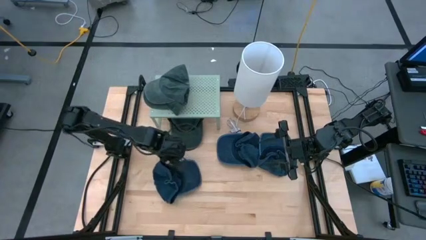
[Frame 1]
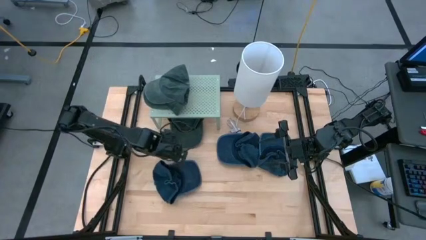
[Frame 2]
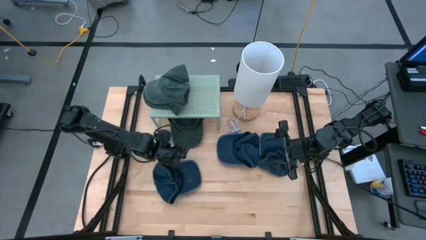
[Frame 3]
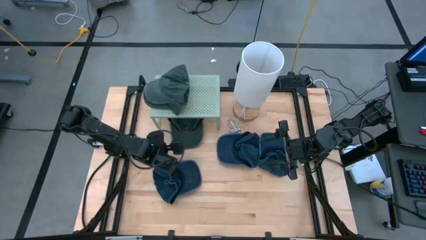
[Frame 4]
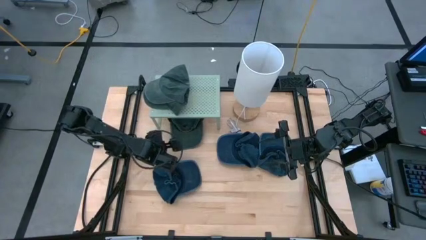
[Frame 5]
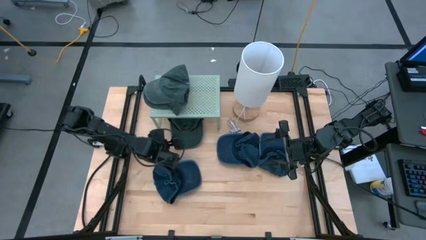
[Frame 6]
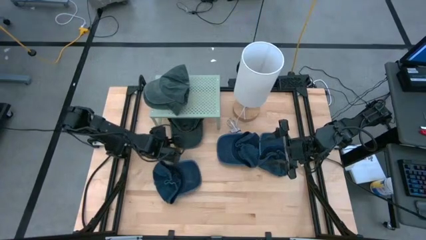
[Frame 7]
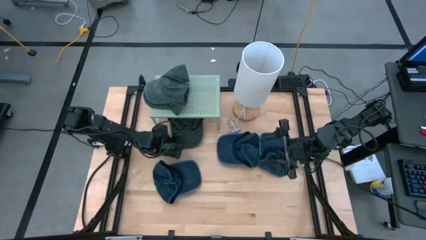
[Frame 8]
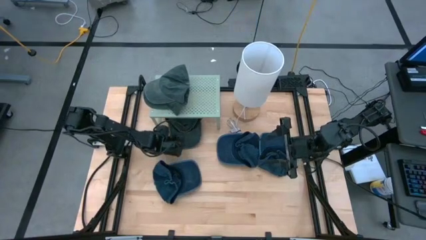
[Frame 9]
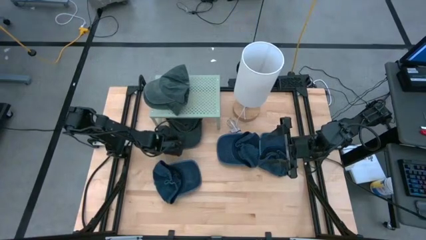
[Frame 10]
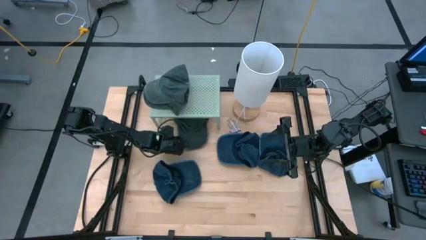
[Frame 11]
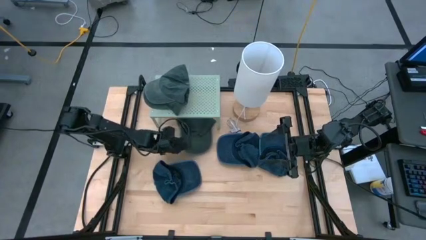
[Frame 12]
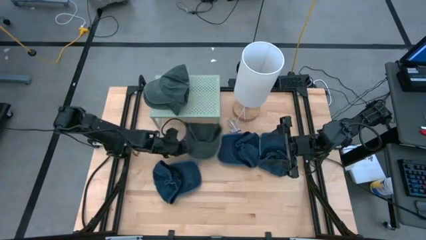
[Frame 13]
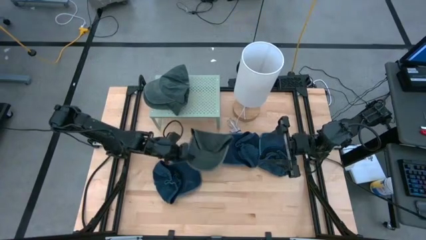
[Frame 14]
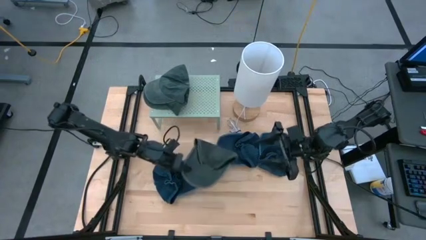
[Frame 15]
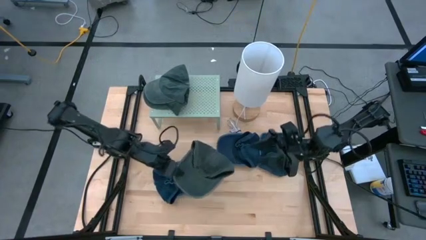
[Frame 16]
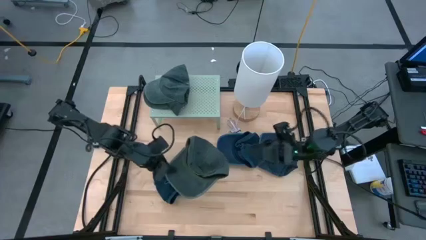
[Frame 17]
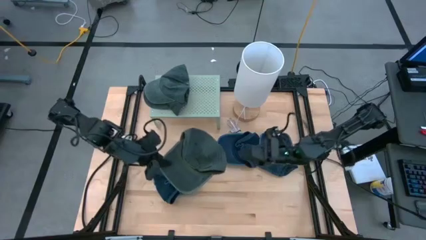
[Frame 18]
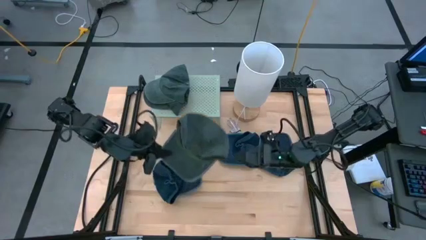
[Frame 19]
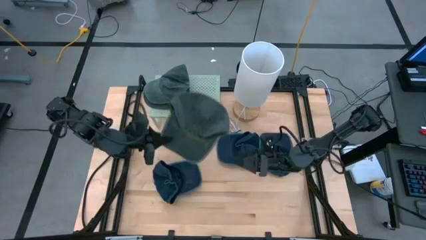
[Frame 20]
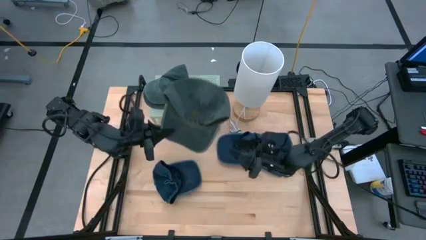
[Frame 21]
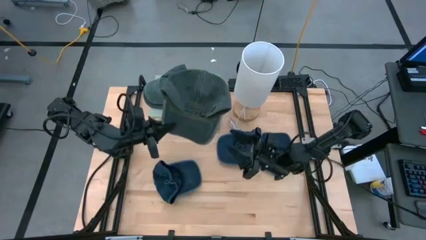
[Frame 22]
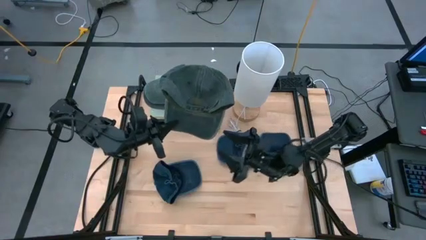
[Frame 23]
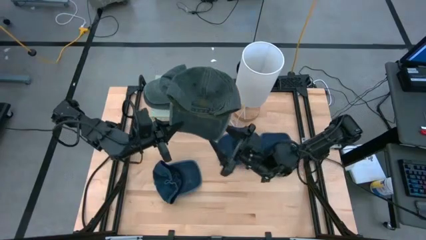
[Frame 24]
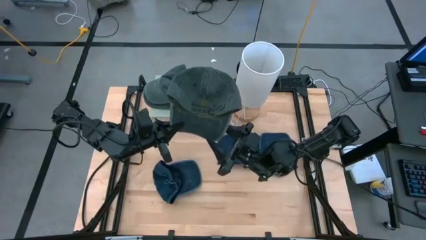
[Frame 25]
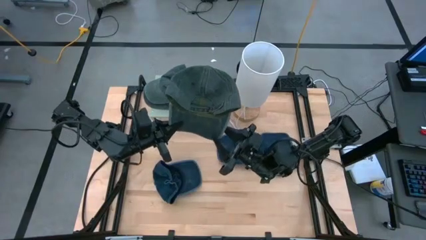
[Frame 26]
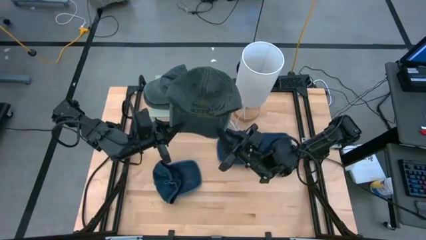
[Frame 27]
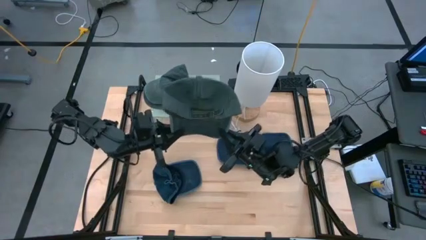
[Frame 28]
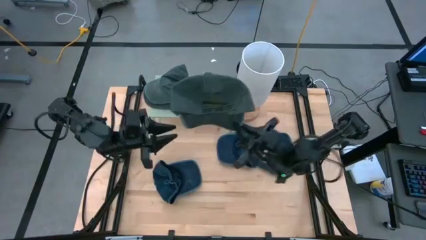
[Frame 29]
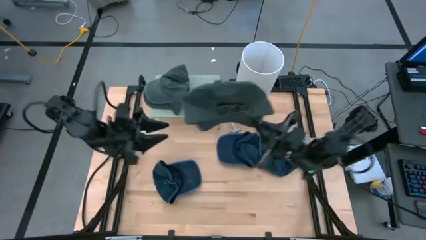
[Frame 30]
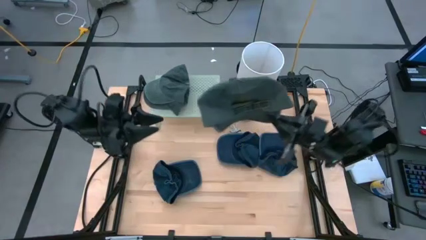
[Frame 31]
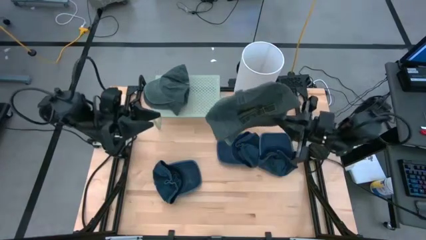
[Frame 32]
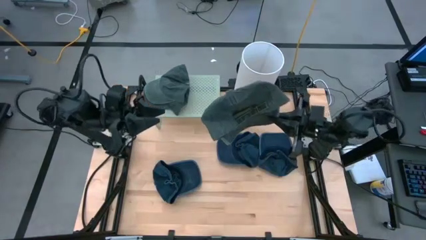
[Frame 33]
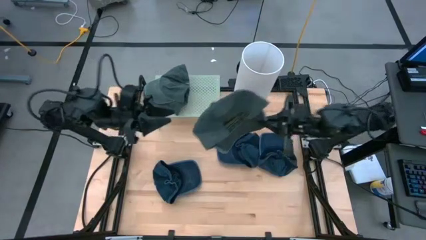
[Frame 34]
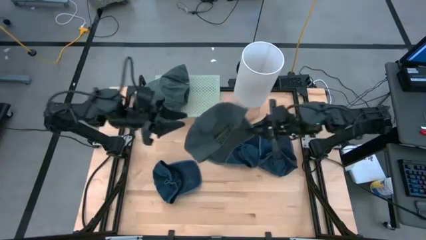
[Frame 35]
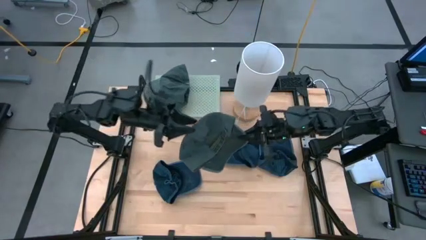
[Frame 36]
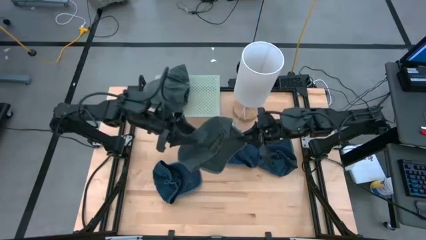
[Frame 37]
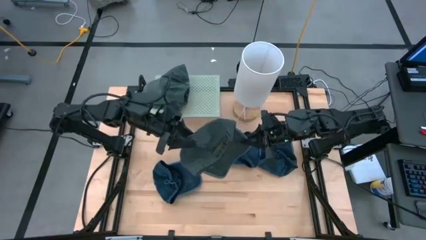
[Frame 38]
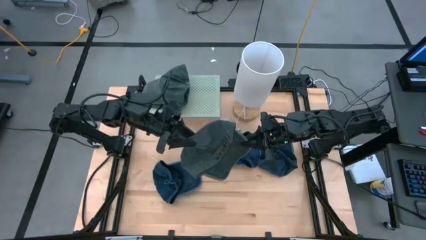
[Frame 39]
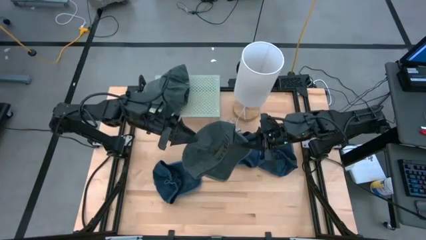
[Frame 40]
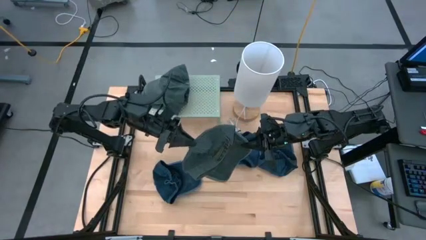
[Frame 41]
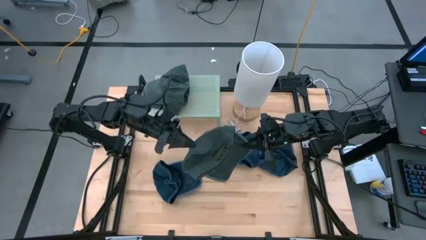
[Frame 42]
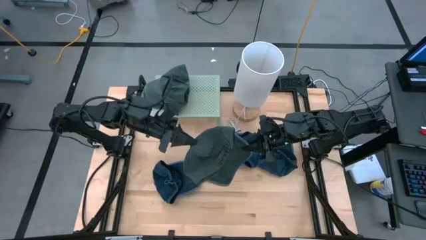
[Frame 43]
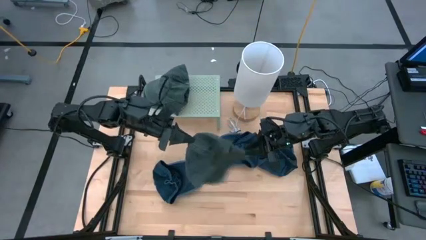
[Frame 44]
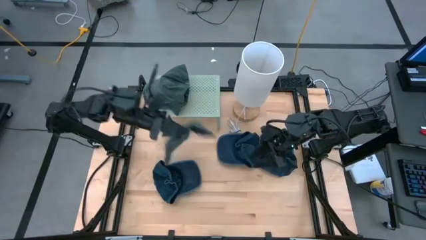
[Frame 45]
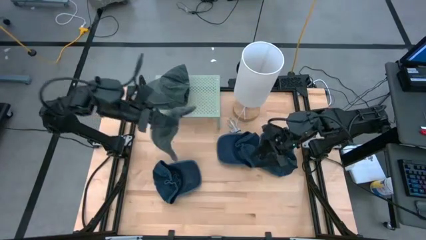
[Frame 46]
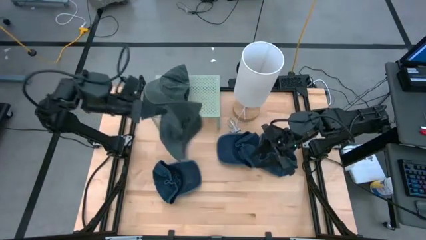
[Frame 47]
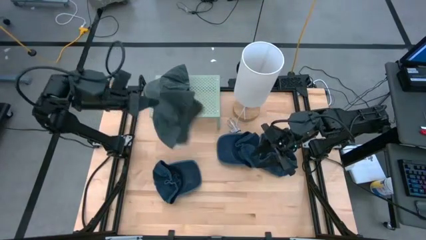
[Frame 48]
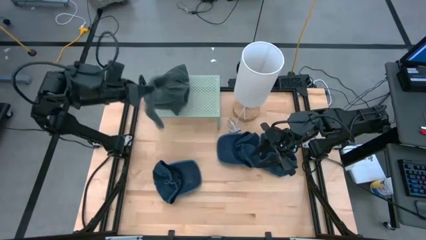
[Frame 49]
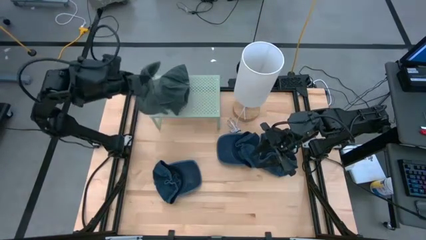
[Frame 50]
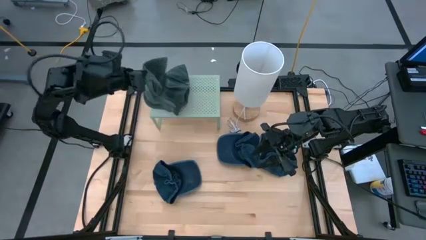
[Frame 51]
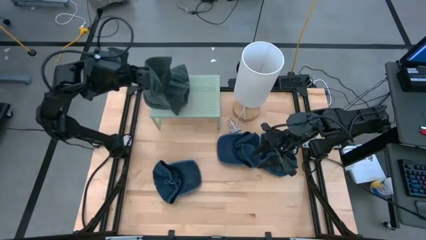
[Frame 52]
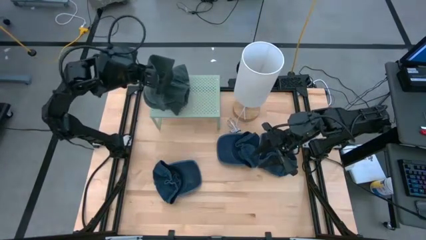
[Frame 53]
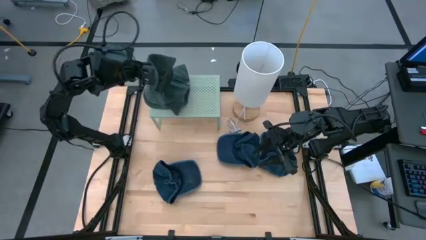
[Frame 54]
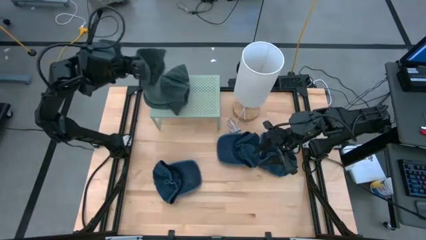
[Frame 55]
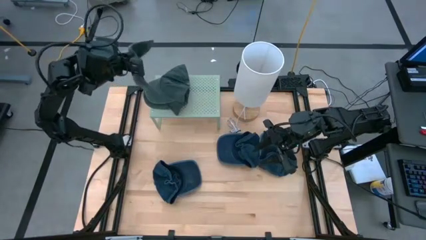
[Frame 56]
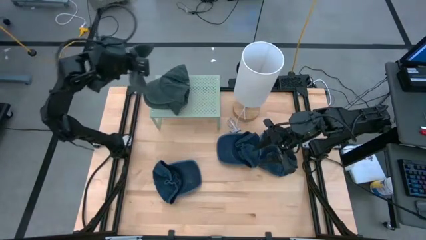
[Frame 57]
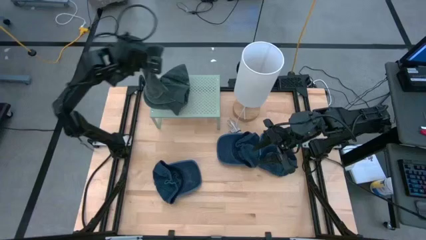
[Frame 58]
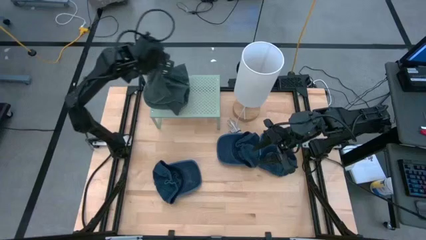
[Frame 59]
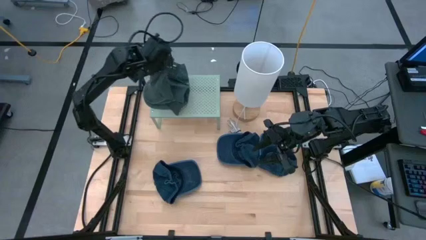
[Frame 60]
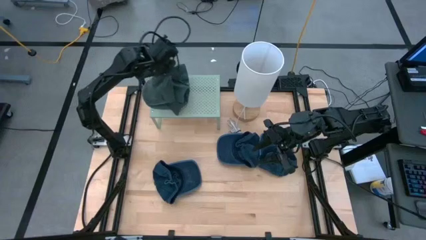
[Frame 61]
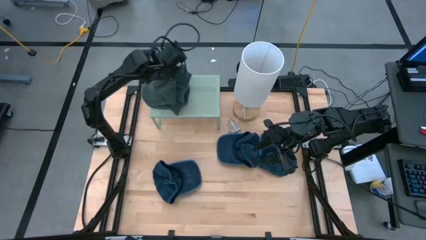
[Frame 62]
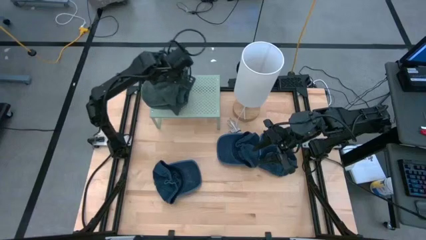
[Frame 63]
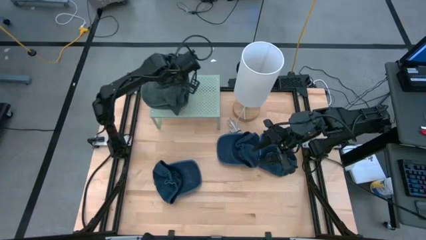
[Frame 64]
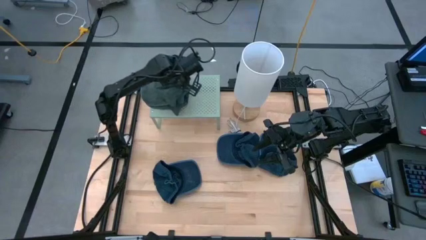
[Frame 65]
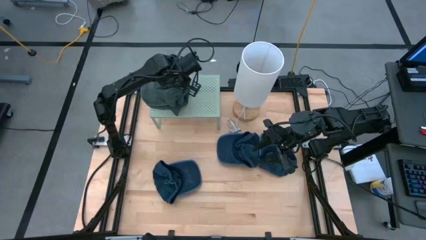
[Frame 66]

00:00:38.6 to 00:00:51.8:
Task: Pick & Place hat
Stack the gray cap on top of the stacked gray caps on the shelf
